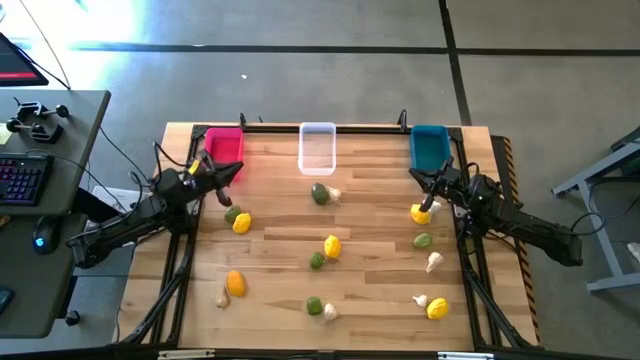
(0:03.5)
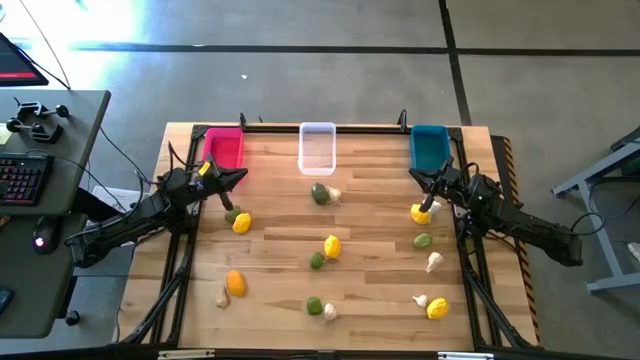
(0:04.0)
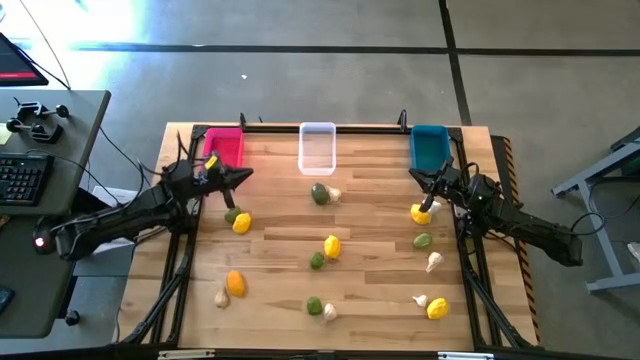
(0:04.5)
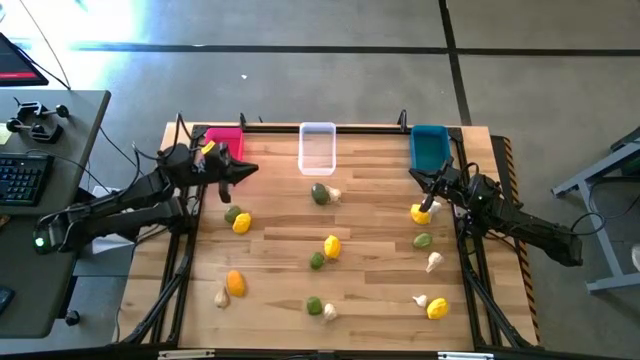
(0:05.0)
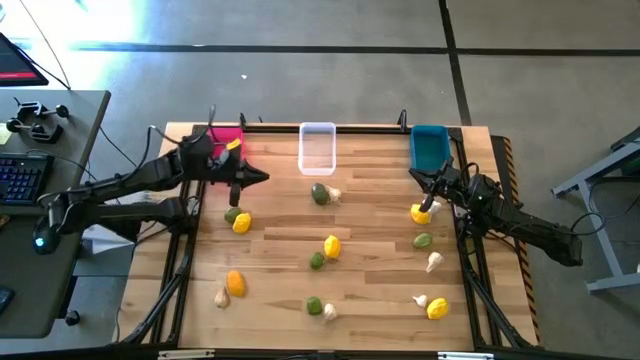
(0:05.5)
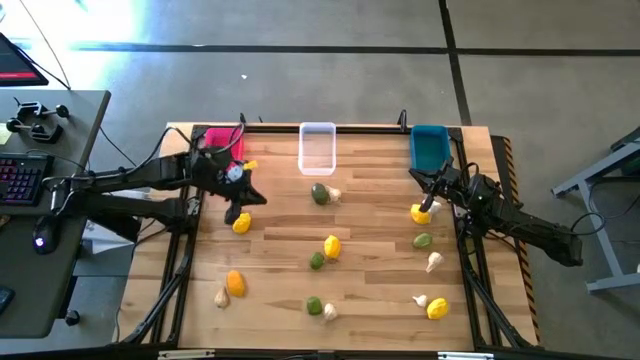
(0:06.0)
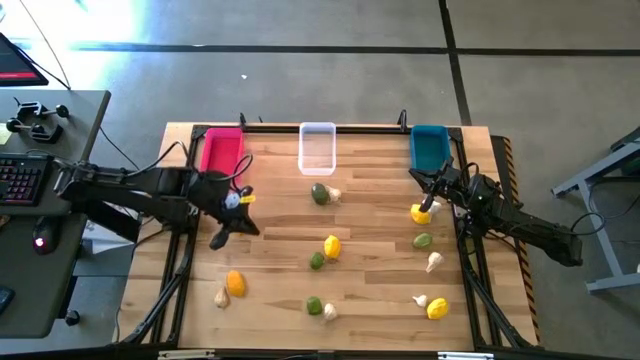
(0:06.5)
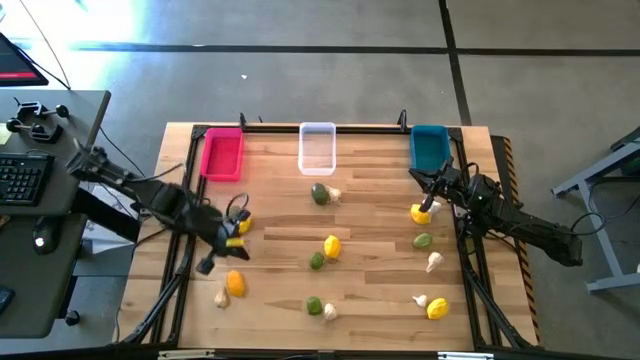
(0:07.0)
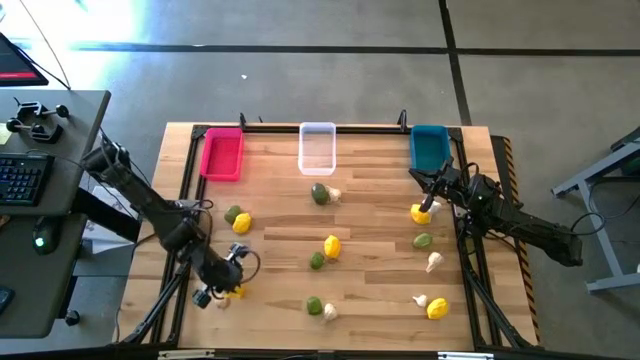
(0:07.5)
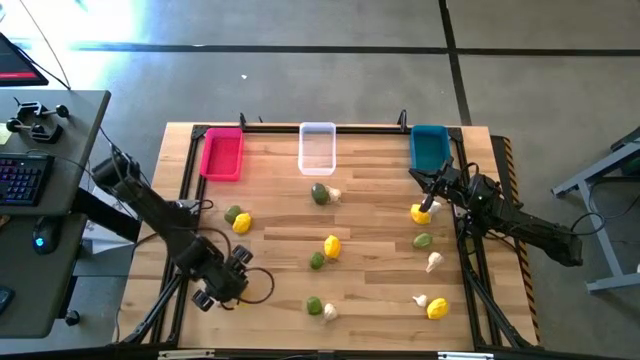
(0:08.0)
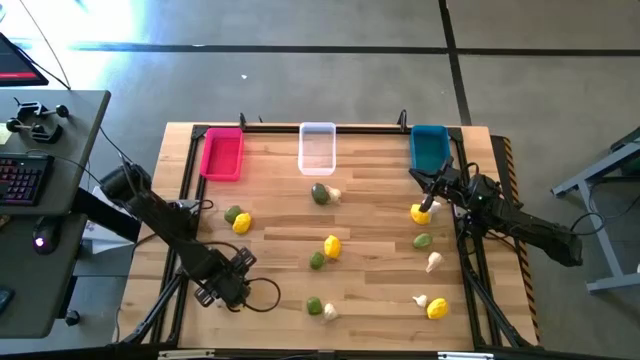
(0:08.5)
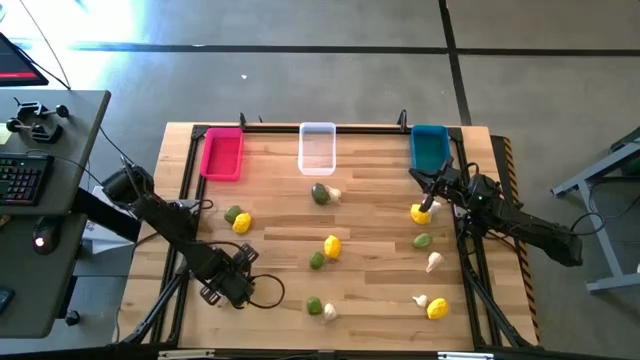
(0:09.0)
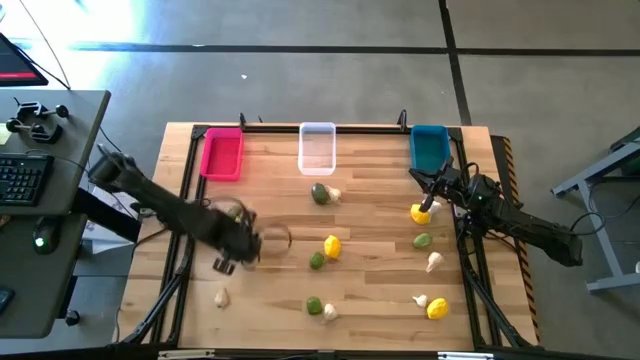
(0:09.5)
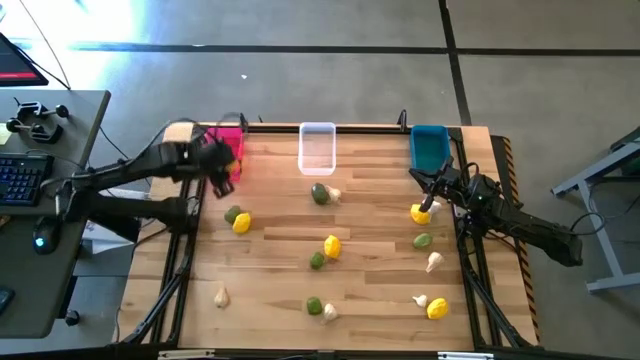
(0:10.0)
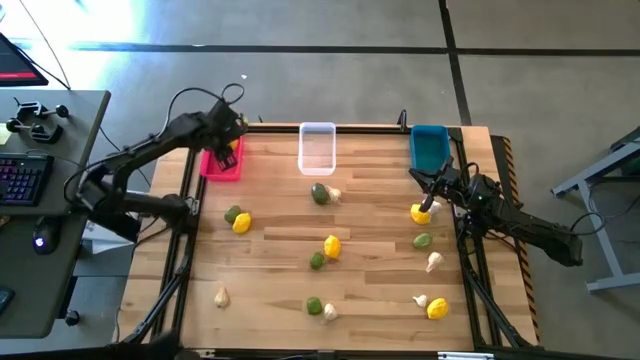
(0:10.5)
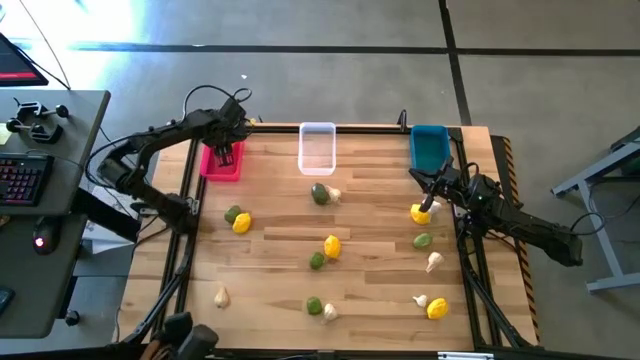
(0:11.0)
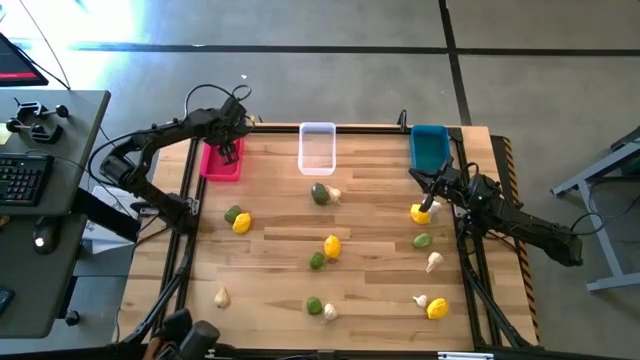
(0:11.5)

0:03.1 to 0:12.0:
Task: Sort produce into baskets
Put the lemon into the pink bin

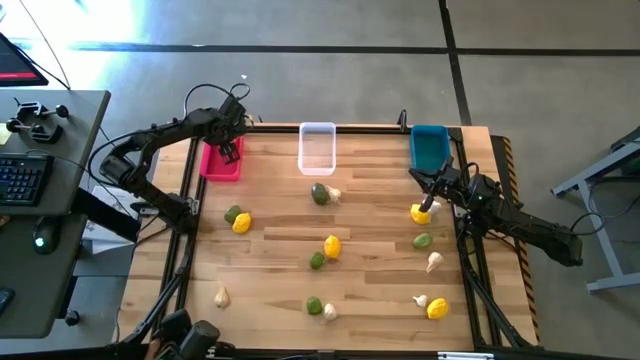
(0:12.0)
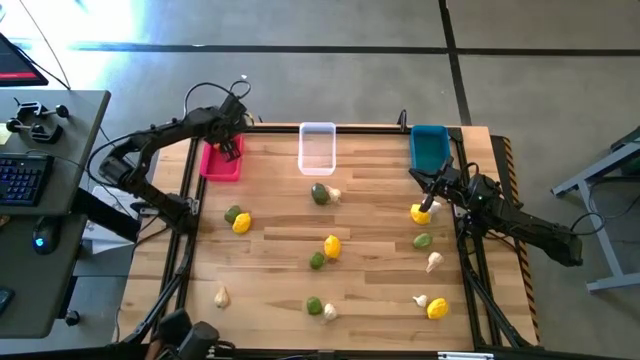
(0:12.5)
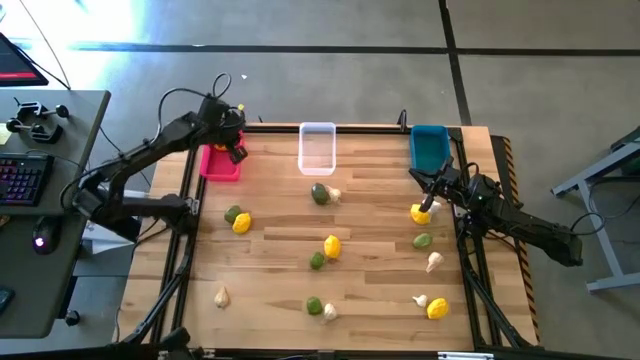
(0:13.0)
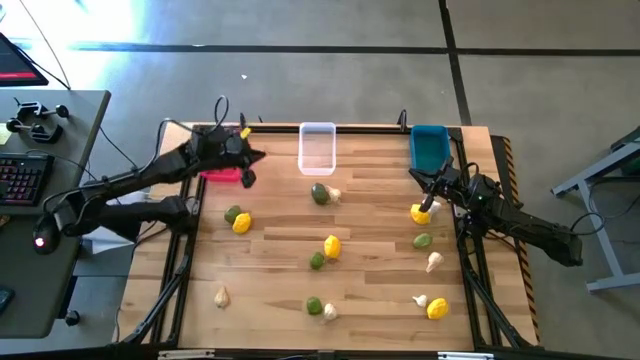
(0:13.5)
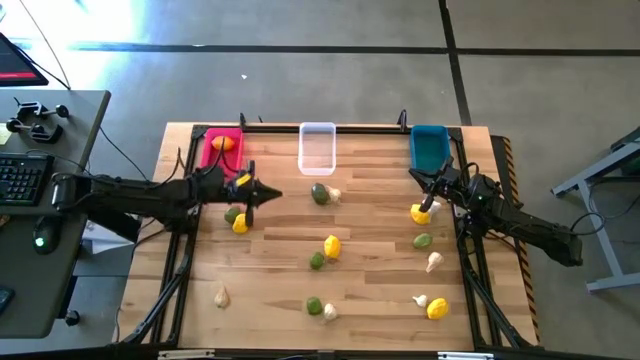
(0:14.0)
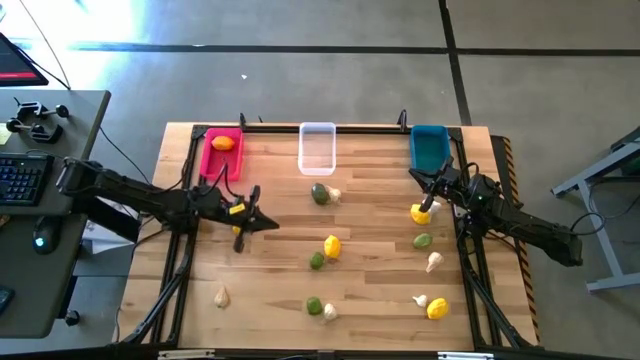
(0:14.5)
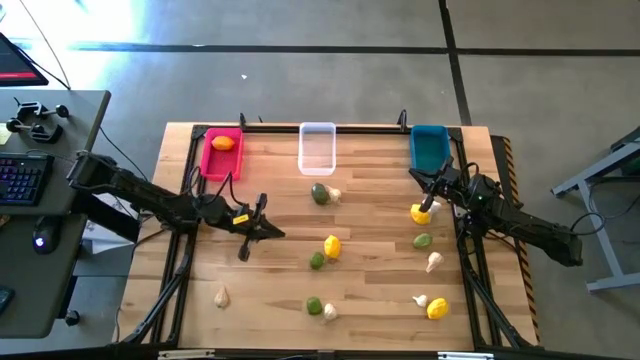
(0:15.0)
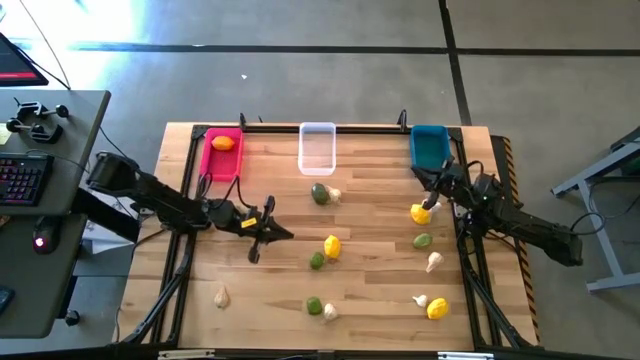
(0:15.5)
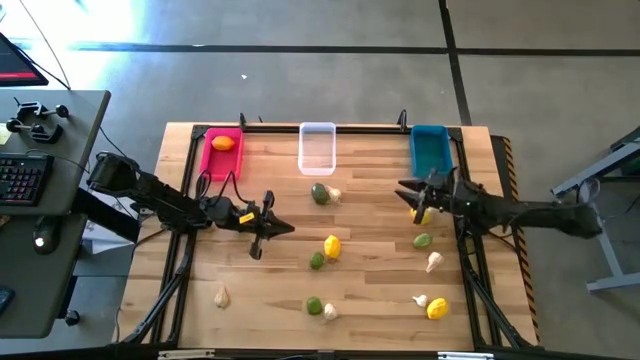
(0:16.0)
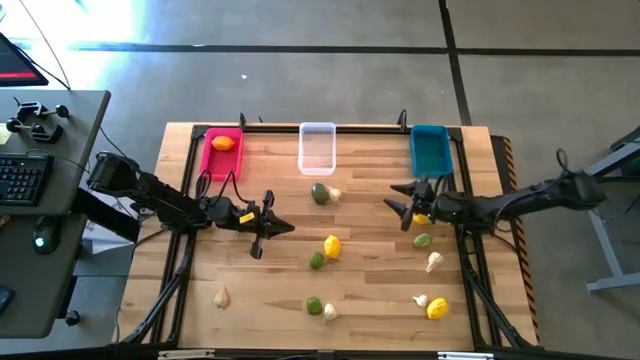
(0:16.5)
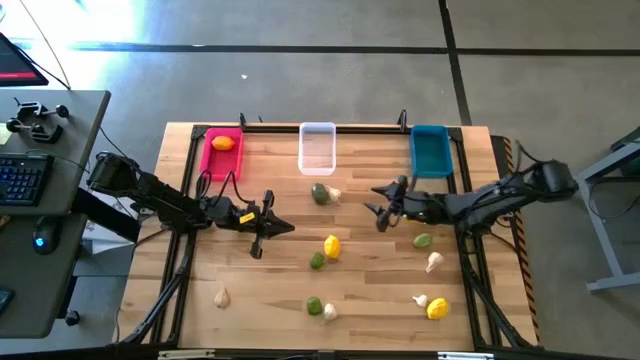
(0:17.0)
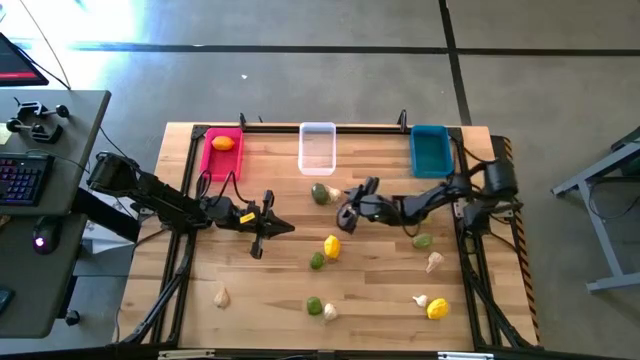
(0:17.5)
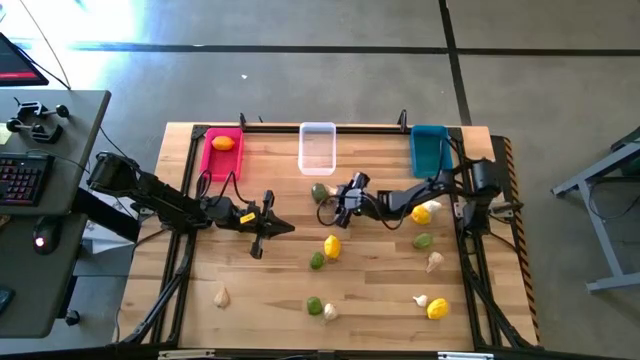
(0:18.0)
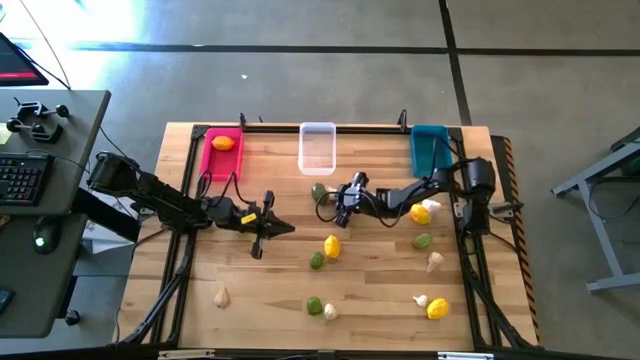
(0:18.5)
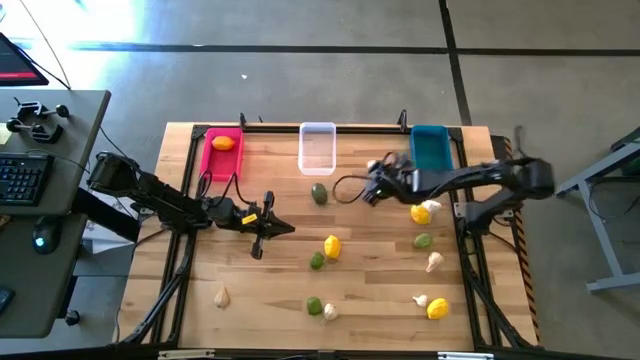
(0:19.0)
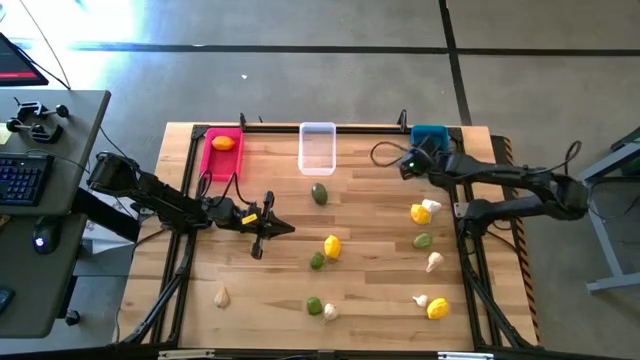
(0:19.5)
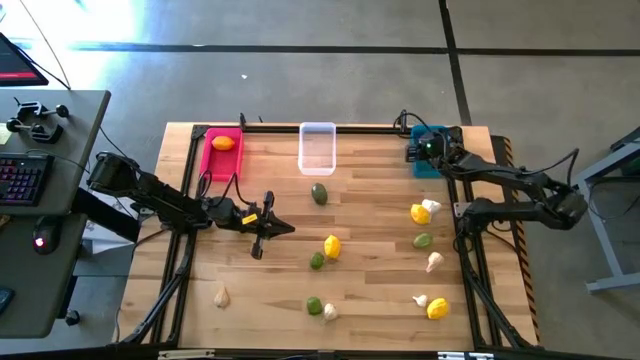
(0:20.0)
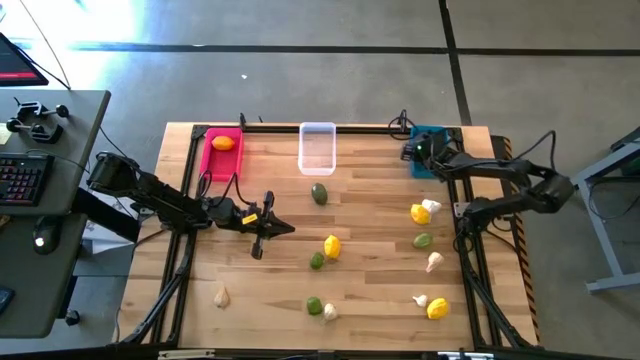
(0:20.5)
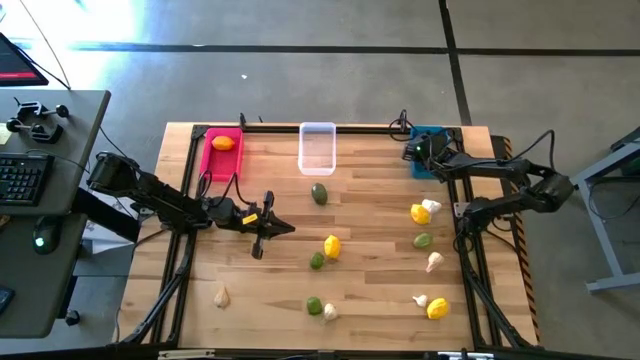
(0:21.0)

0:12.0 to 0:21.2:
Put the garlic into the blue bin

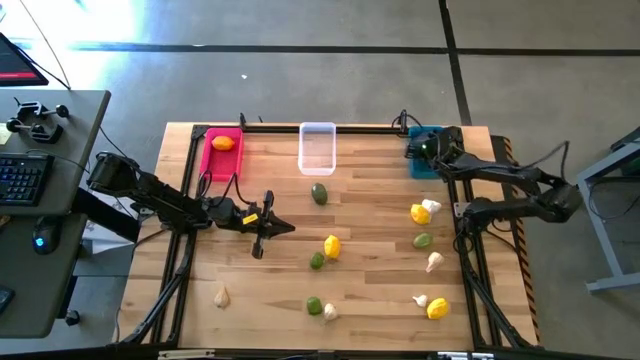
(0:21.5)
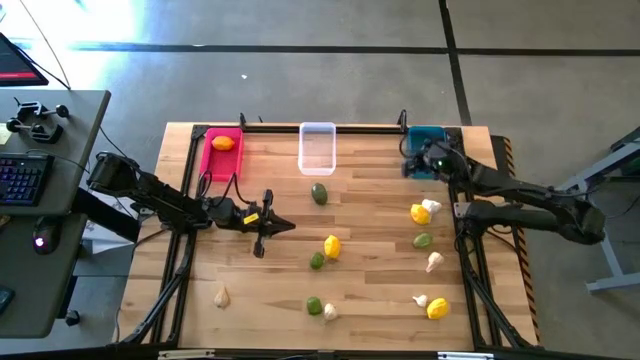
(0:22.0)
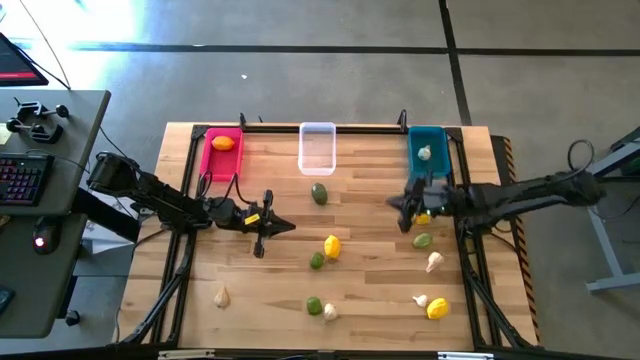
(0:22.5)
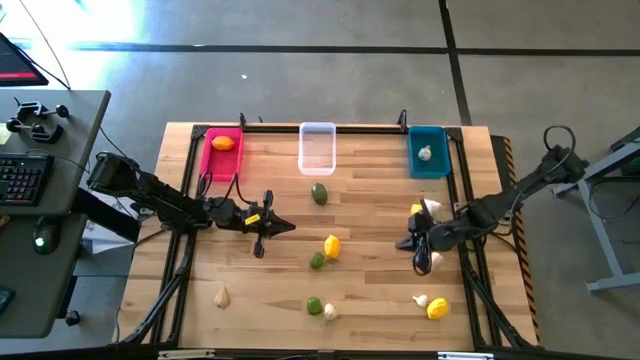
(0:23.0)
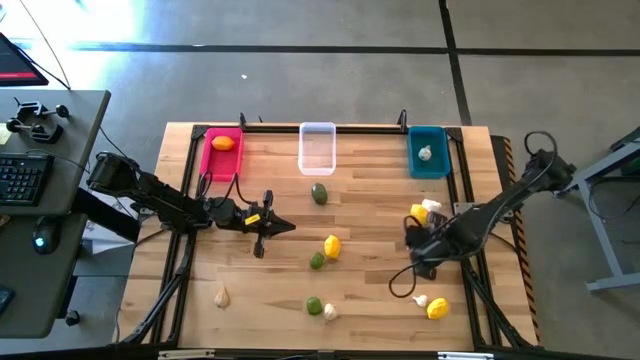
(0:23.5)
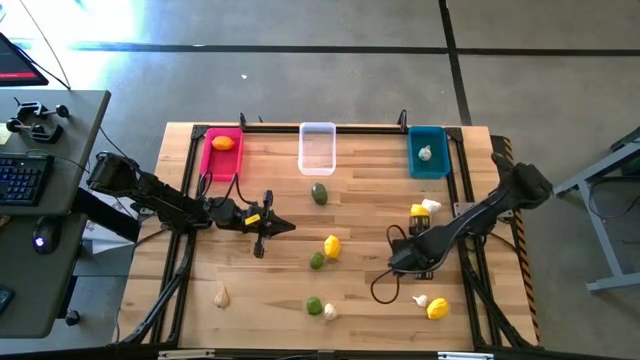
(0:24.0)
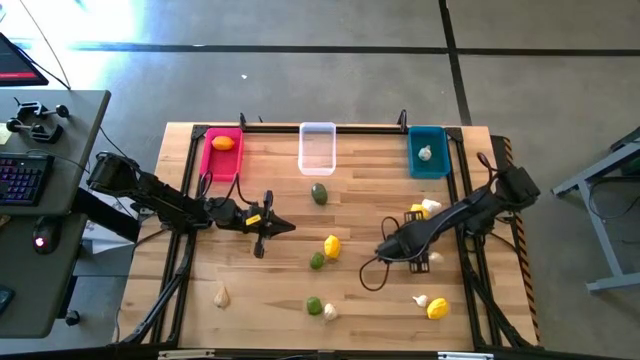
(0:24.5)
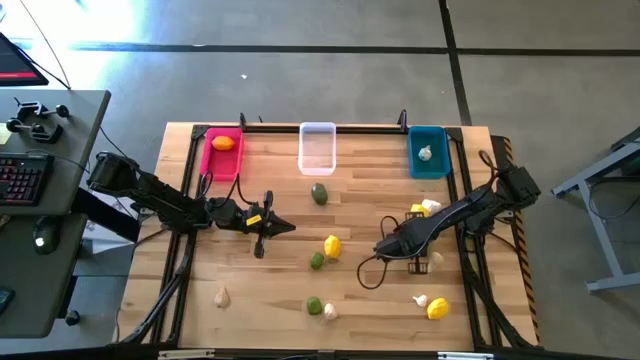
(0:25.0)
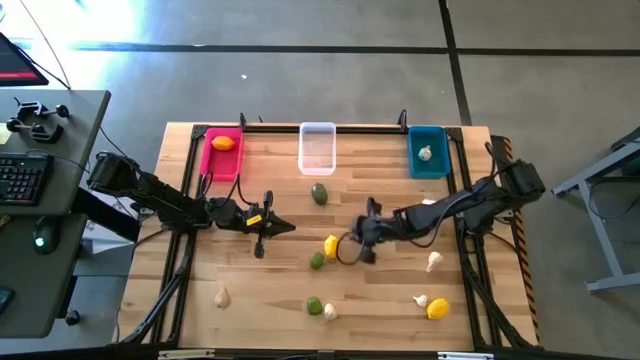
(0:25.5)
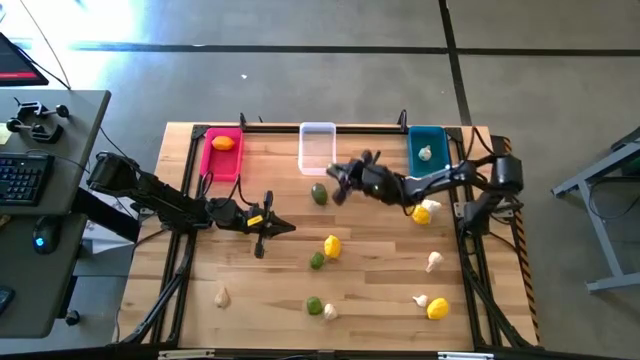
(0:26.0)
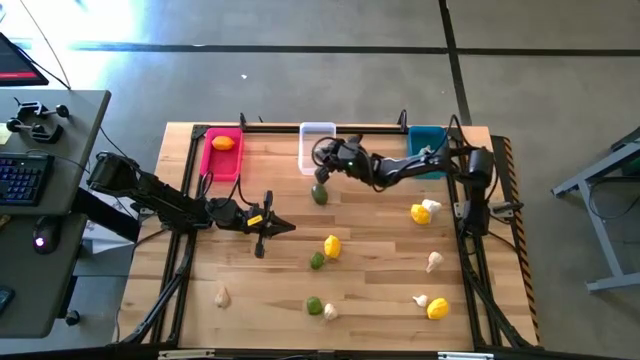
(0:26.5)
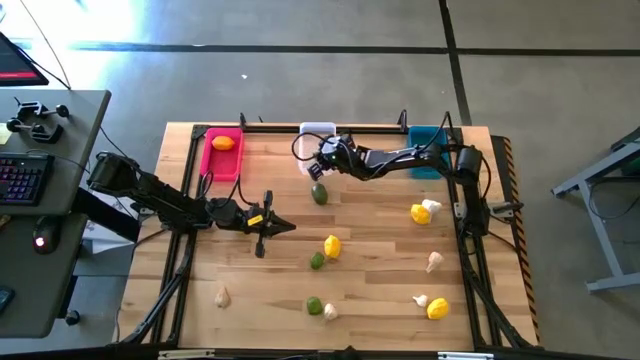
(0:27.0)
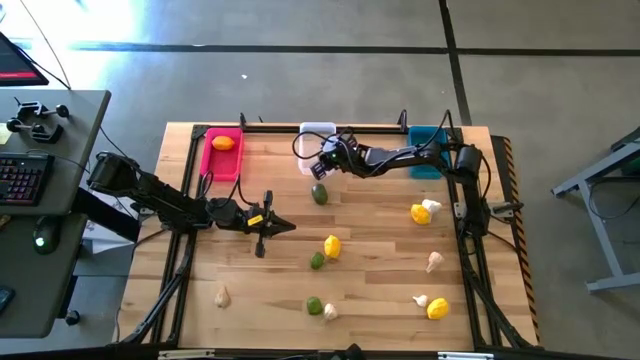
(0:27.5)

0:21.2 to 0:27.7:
Put the lime into the white bin
